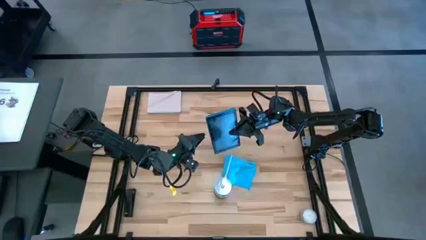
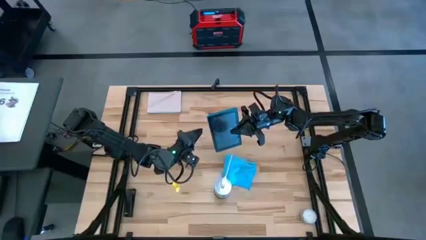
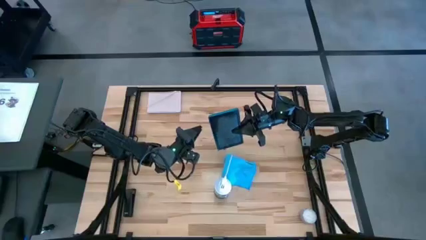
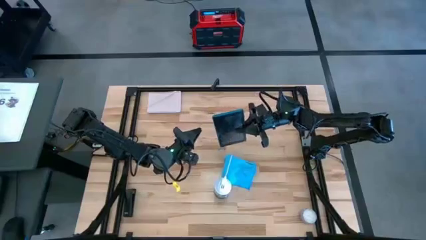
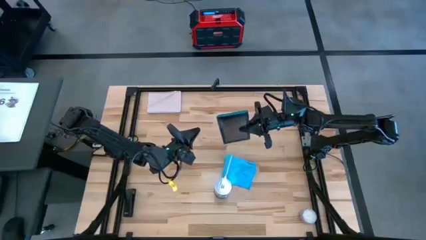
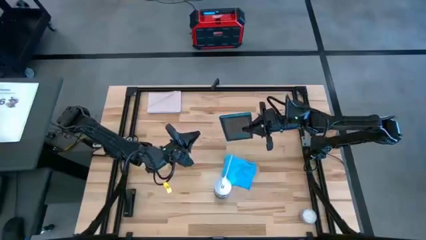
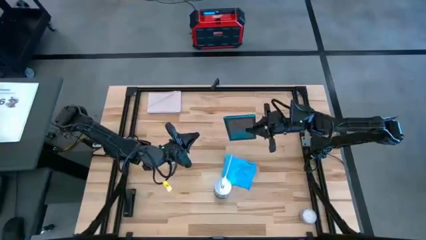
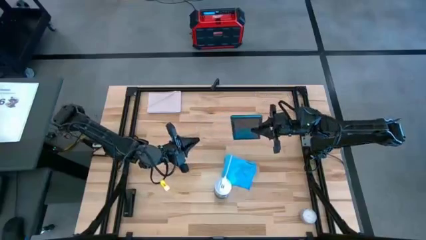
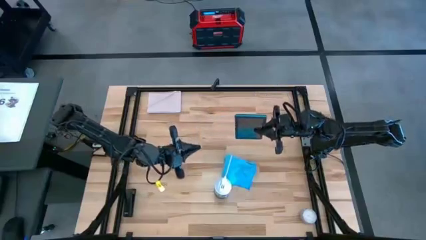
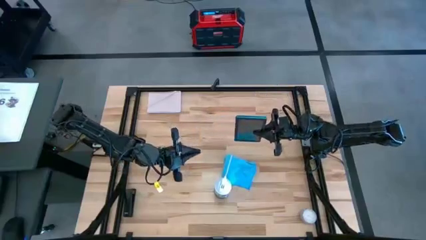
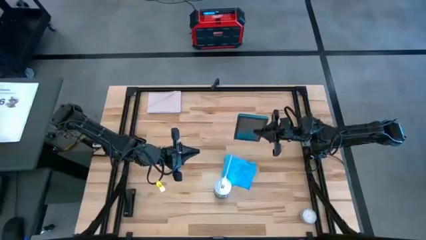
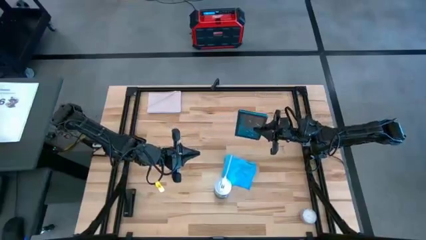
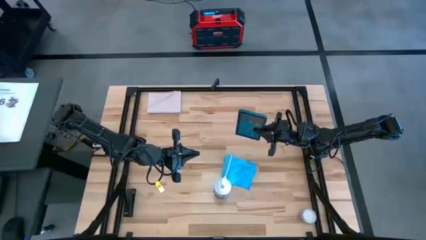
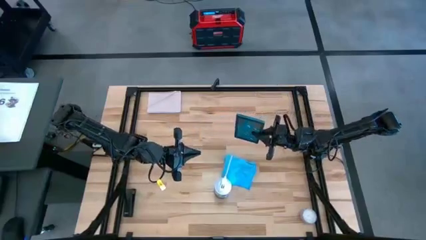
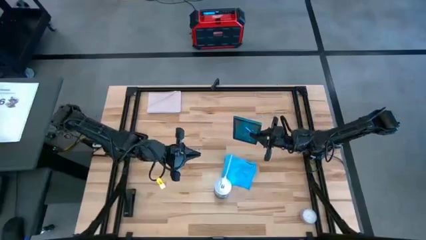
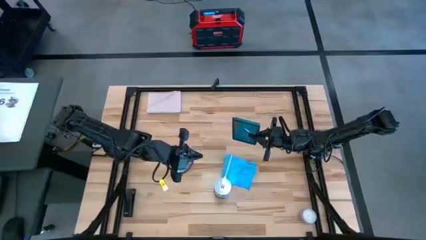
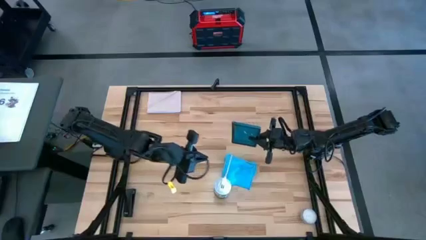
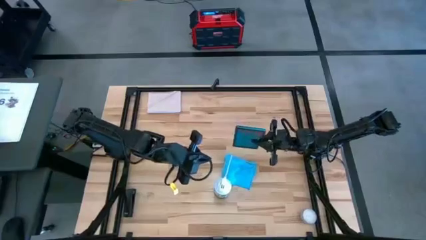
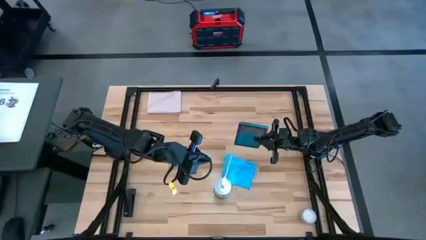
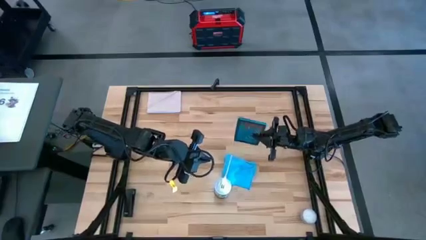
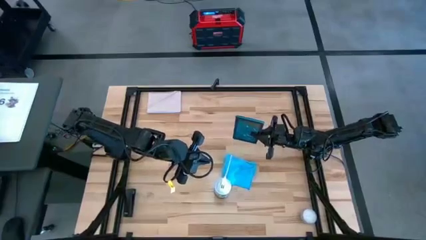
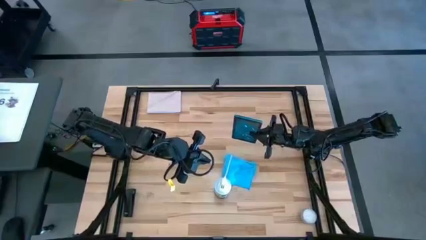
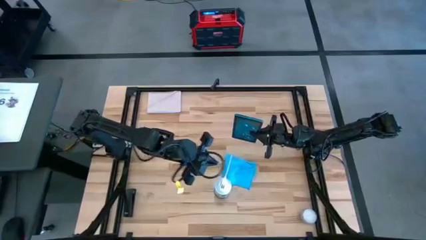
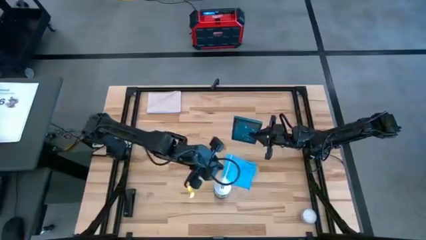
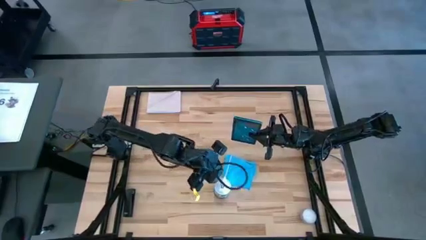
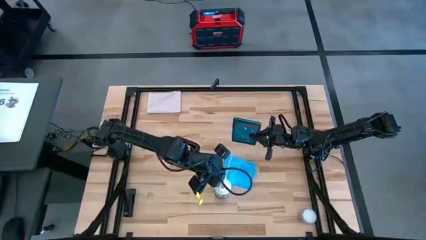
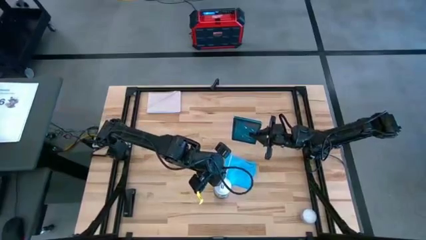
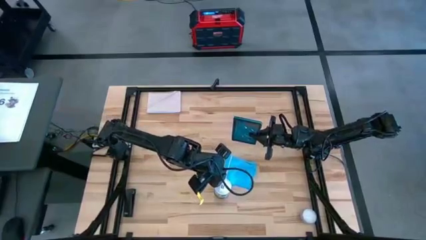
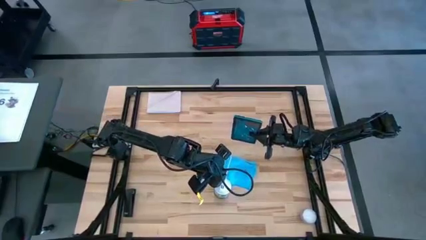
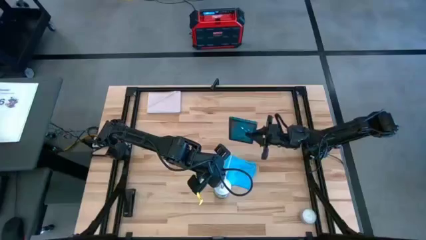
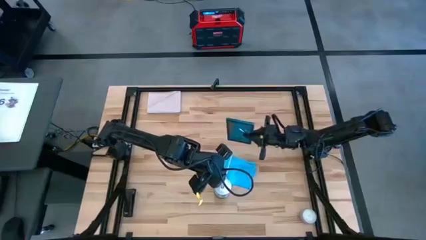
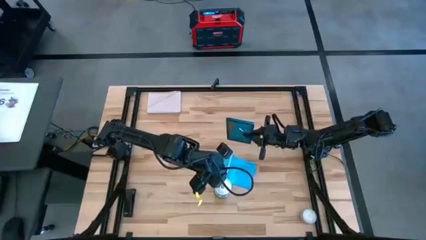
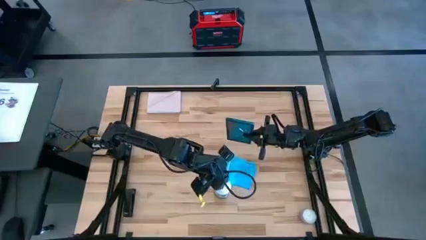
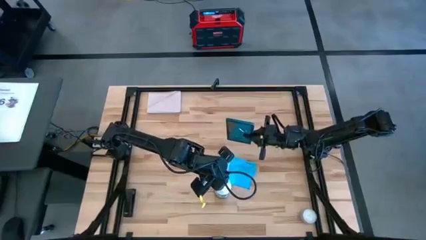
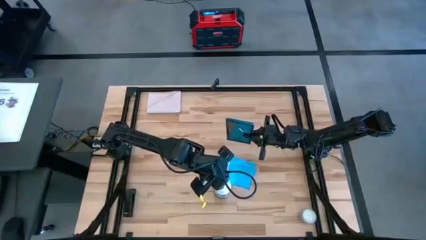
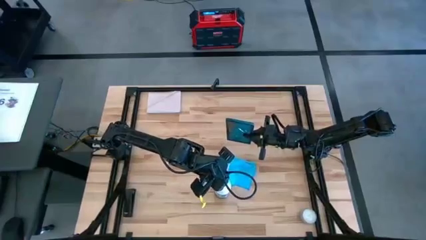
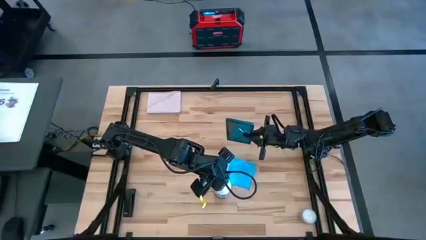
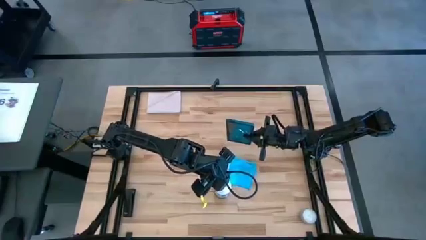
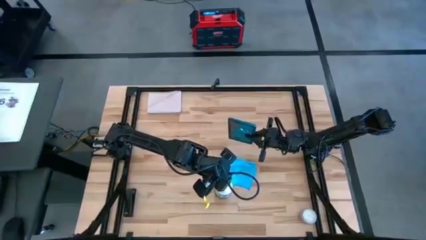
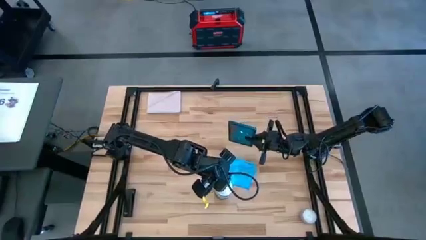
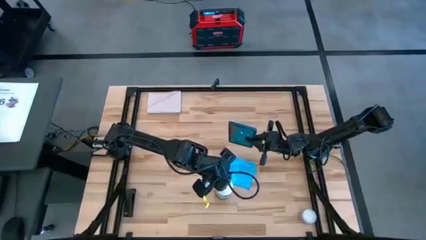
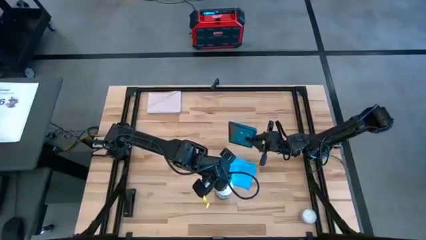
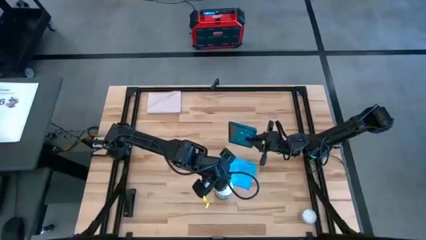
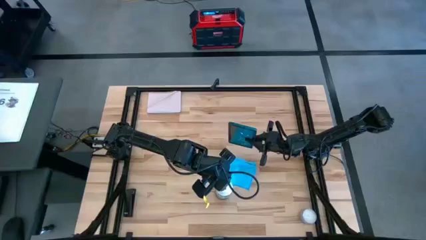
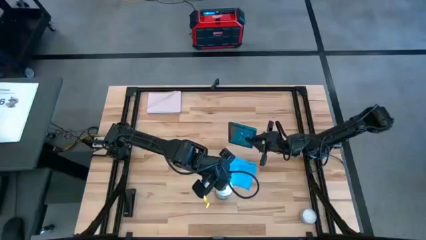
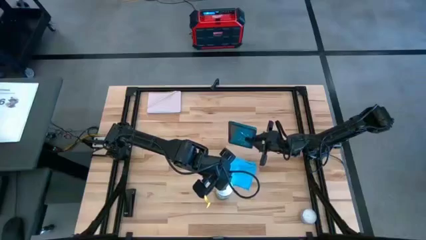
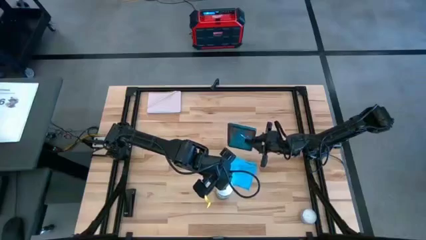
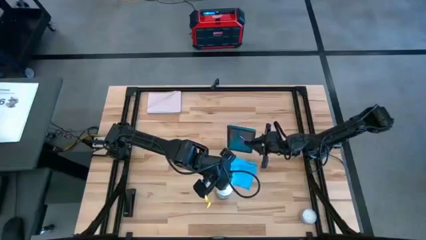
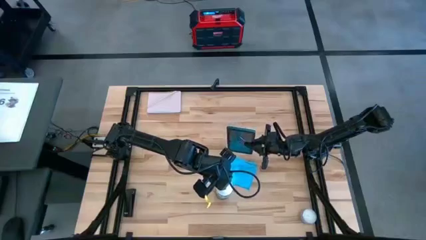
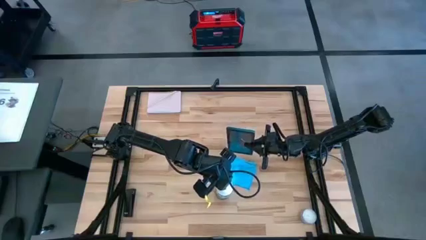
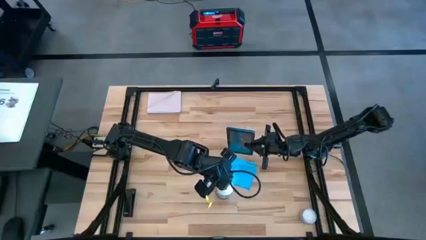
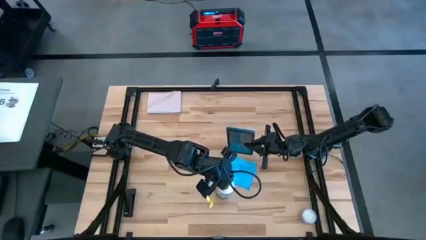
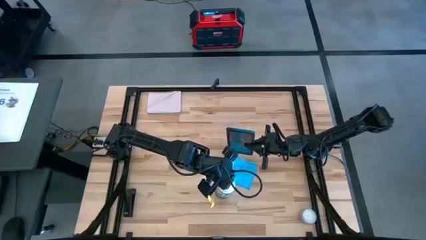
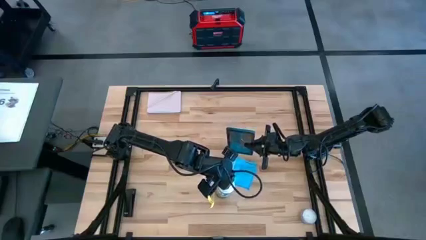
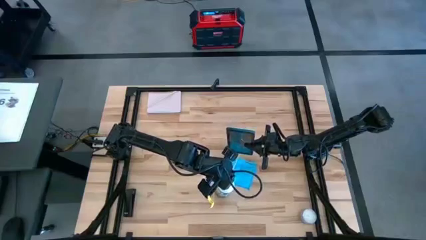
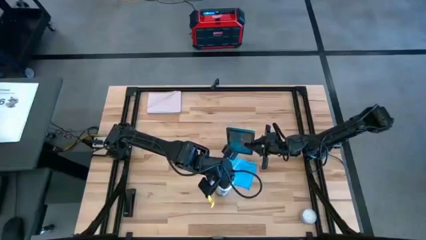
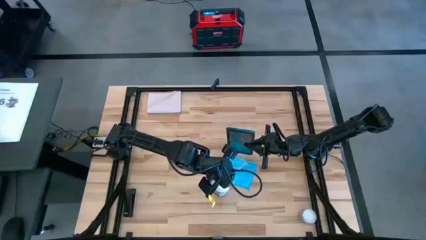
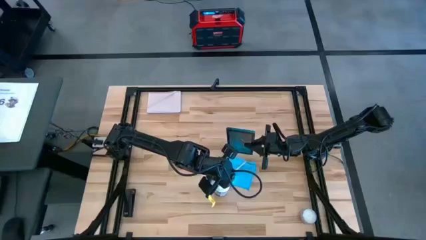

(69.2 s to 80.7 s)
Task: Apply microfiber cloth
Spray the front of the green tablet using the white spray bottle
